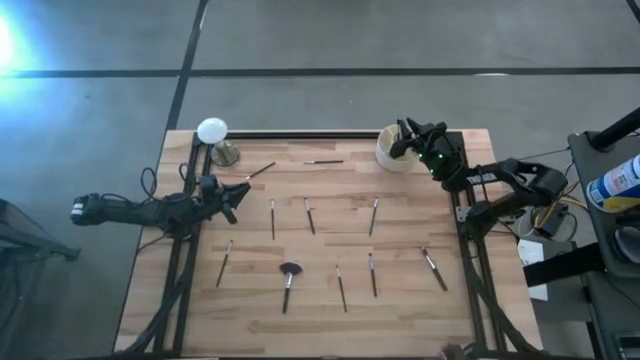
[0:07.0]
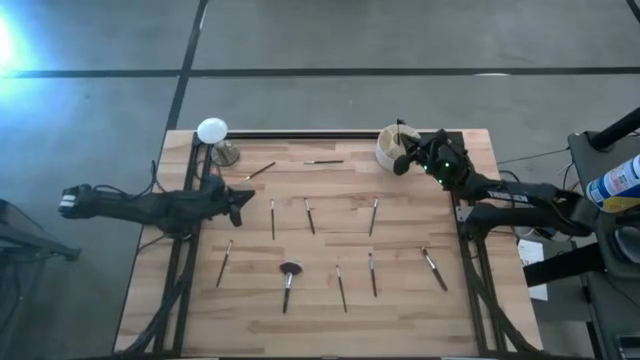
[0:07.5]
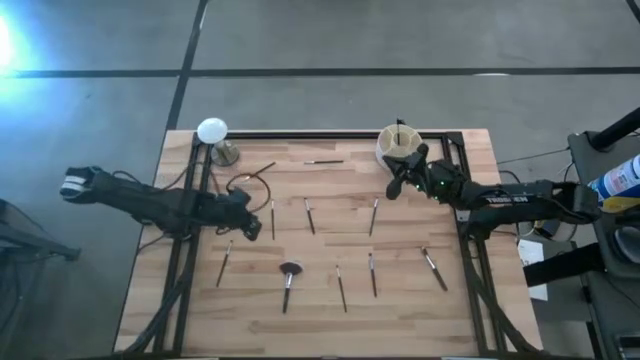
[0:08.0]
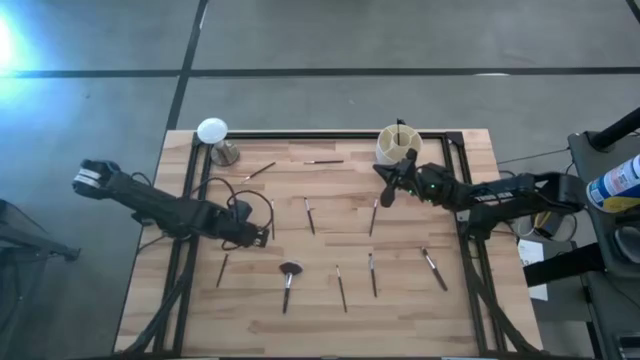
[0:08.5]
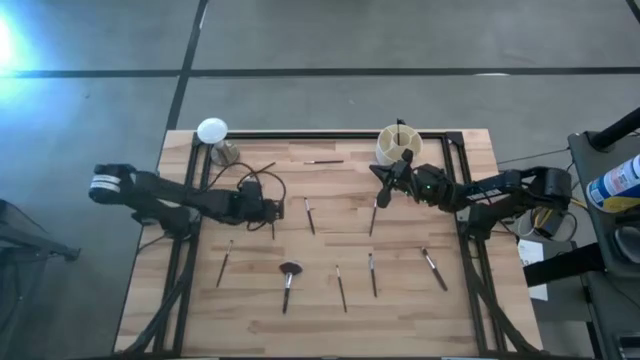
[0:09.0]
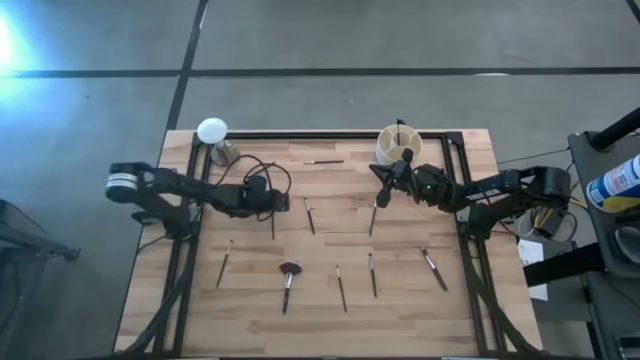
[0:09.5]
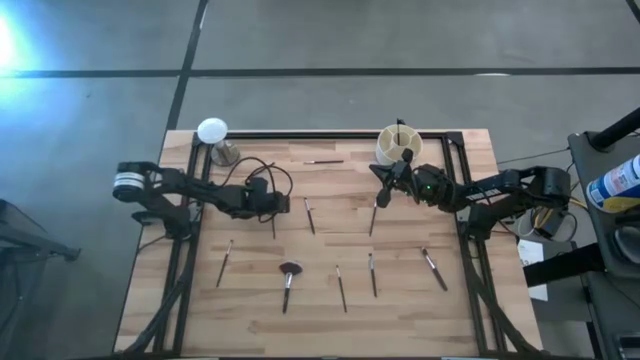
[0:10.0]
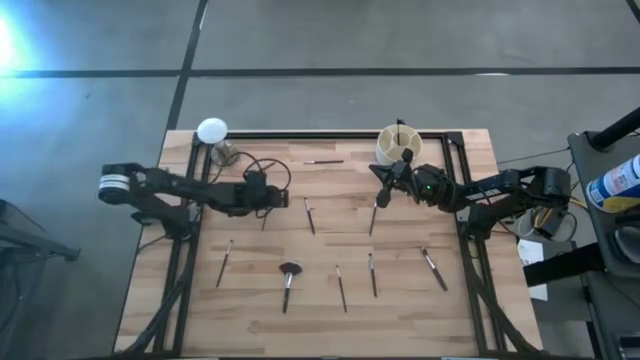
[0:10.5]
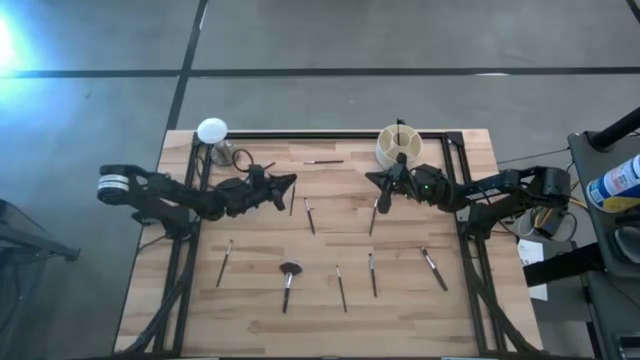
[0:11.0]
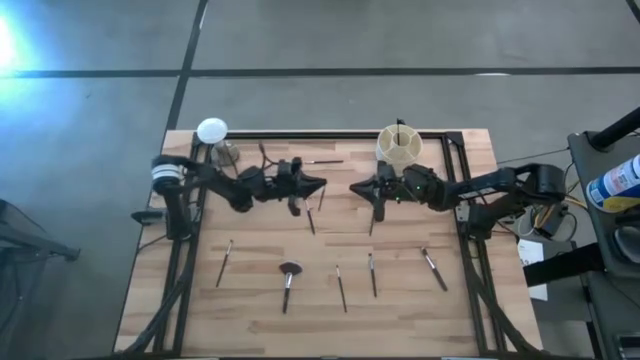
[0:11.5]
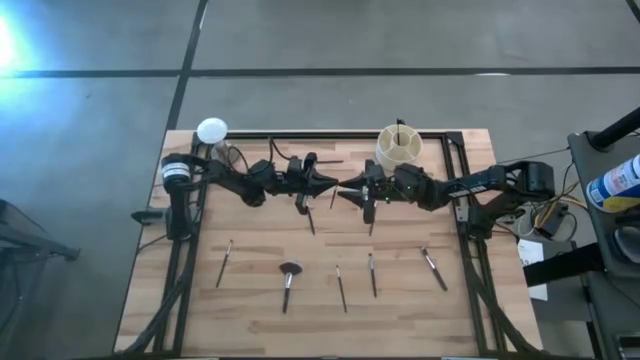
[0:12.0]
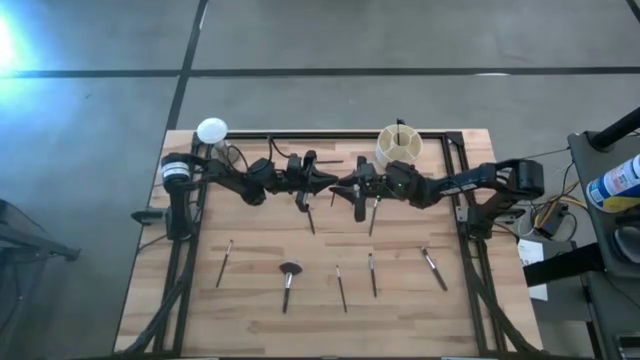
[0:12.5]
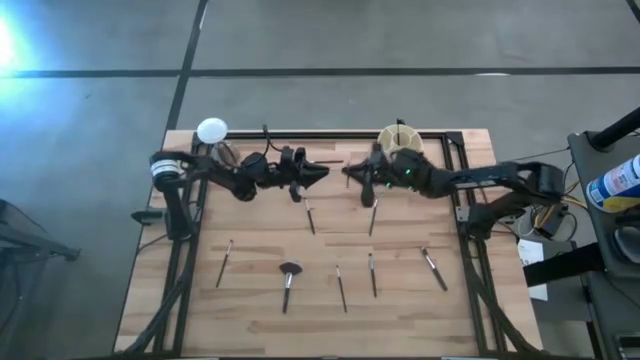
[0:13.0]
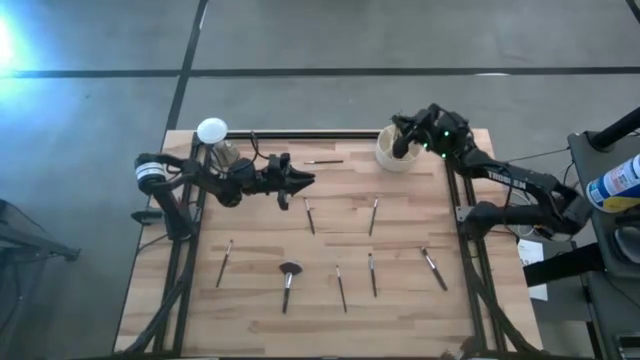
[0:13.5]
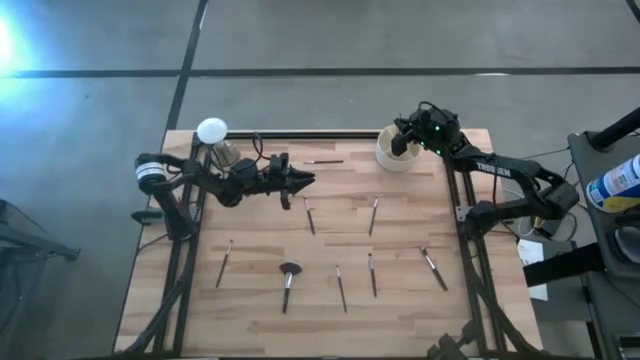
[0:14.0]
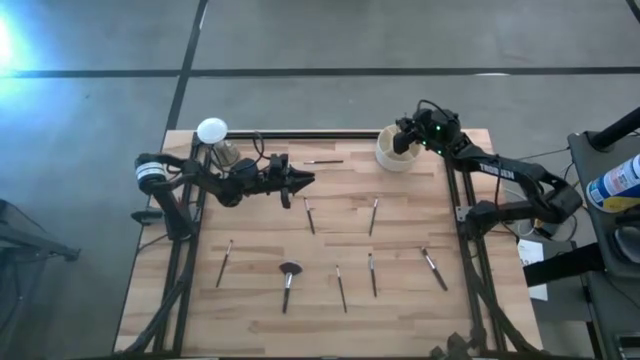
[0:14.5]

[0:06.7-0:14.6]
Task: Put items in baskets/containers
Put the black eyeshadow brush into the white pen organizer

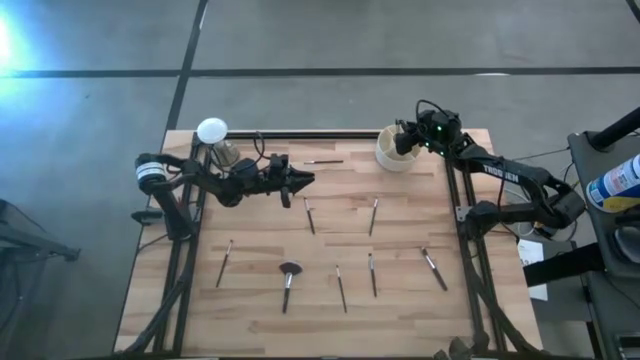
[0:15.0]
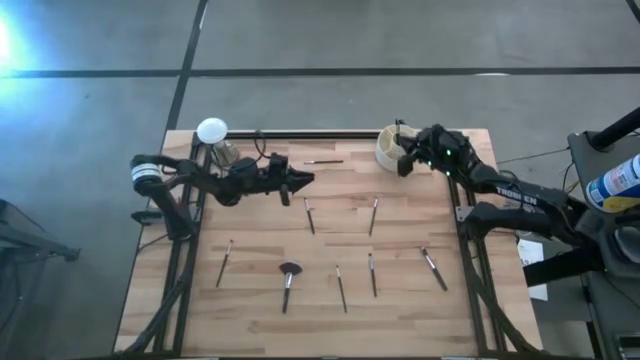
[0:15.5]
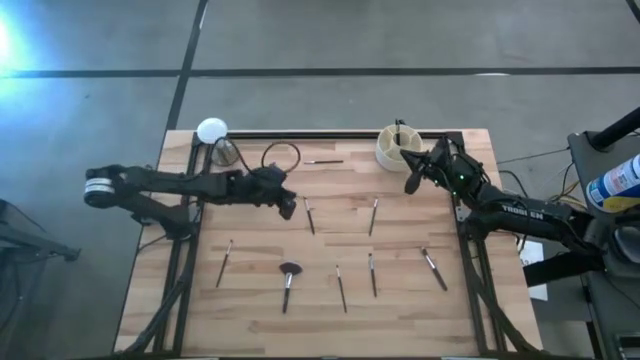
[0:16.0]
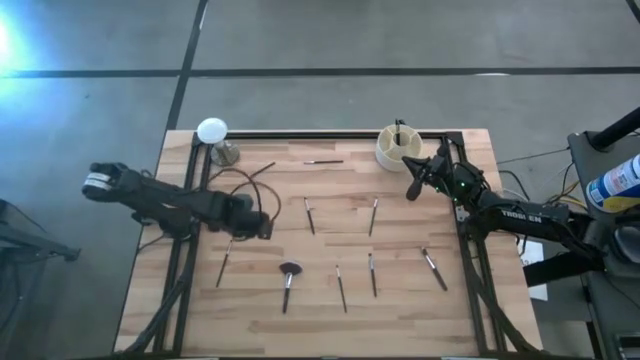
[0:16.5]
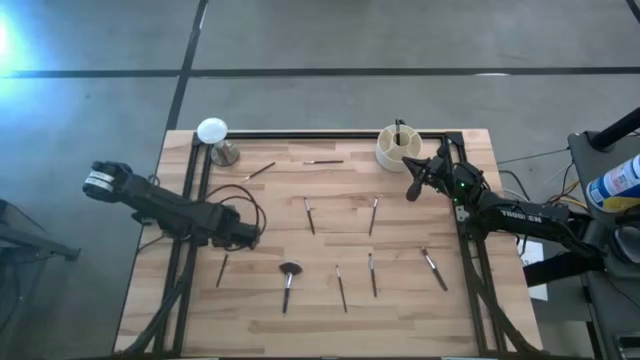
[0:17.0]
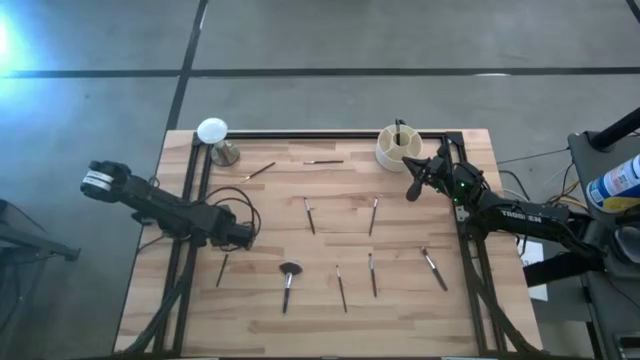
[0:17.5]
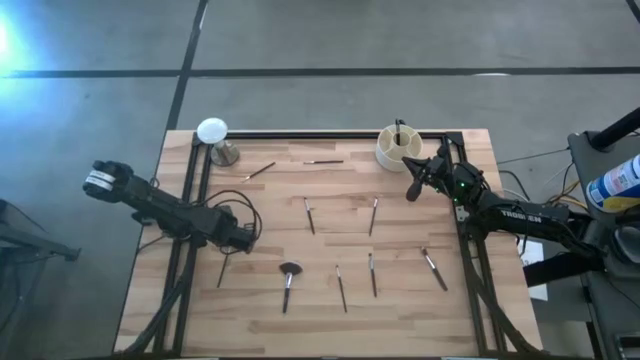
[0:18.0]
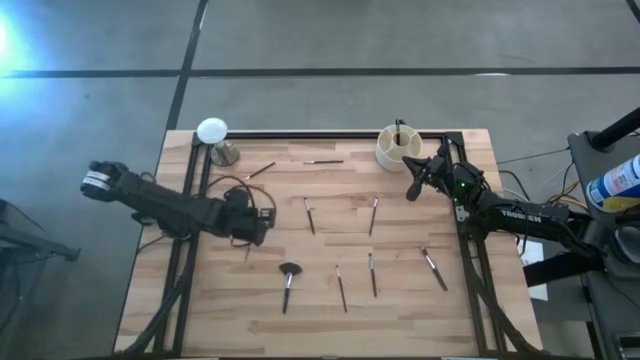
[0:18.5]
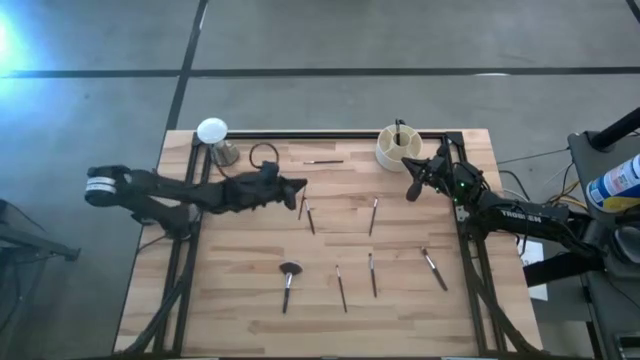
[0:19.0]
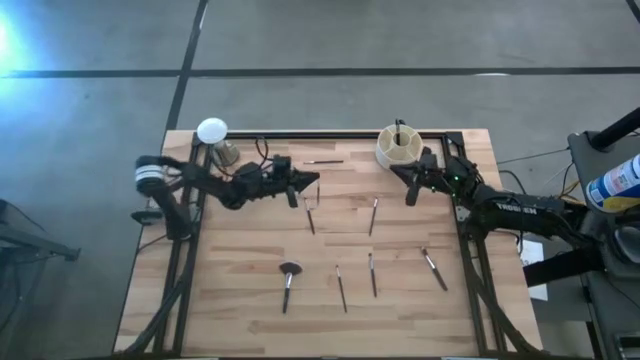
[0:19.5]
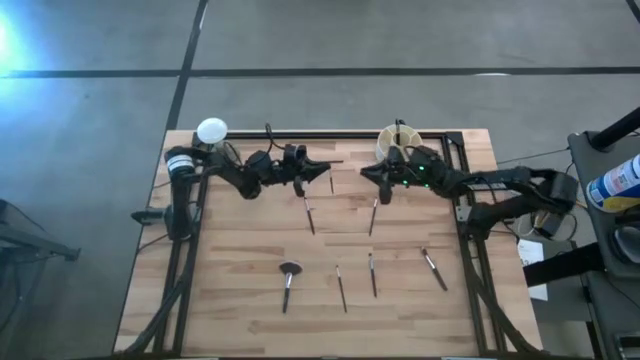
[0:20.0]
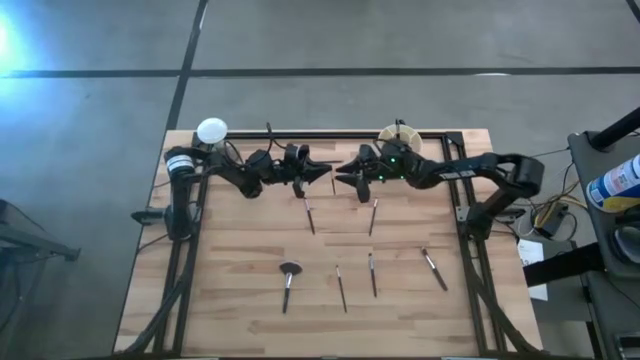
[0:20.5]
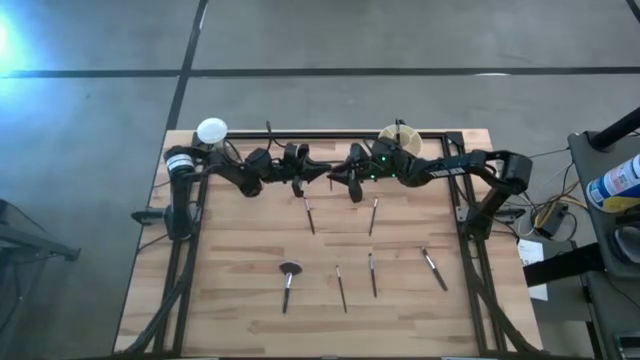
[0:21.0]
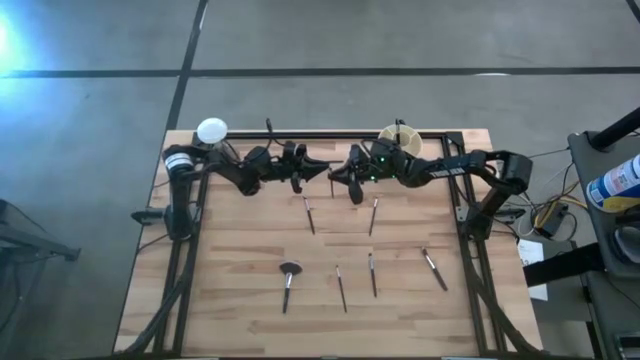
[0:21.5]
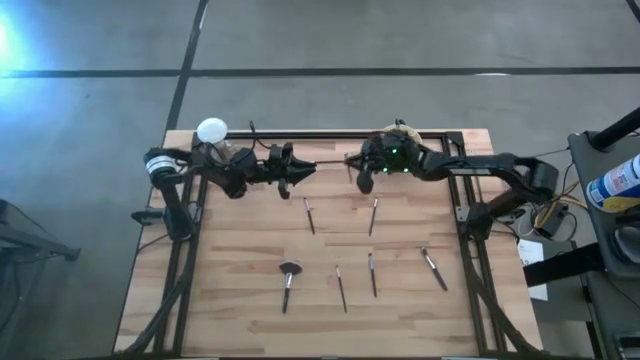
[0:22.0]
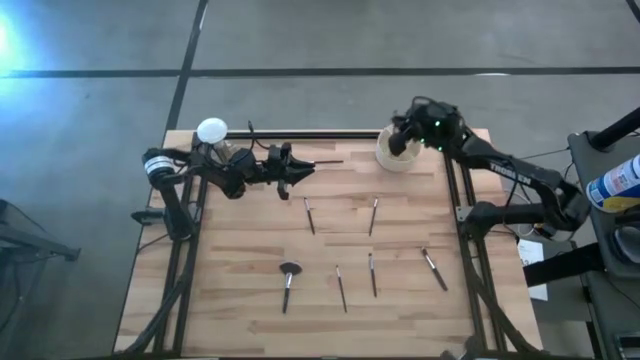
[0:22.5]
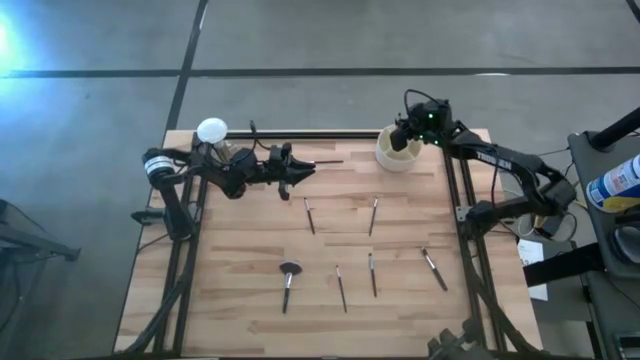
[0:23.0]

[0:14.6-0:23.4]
Put the black eyeshadow brush into the white pen organizer

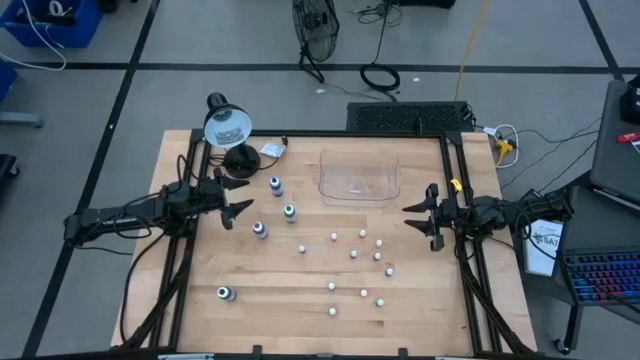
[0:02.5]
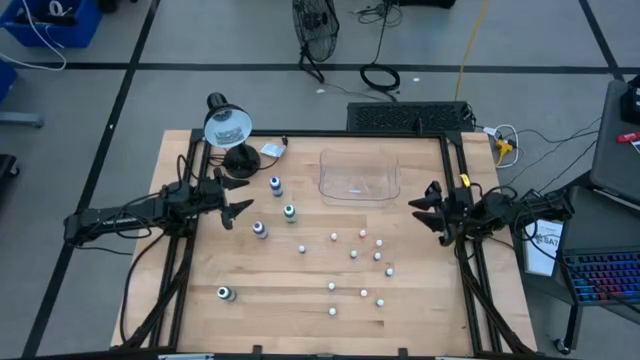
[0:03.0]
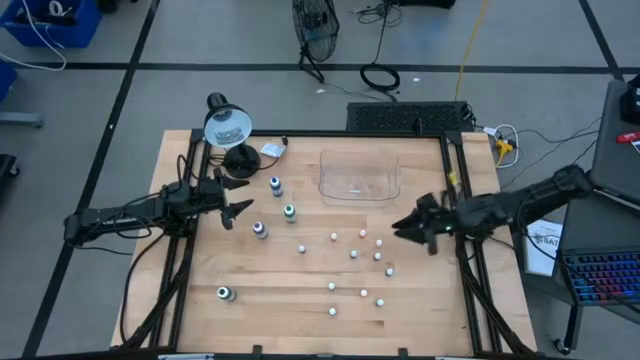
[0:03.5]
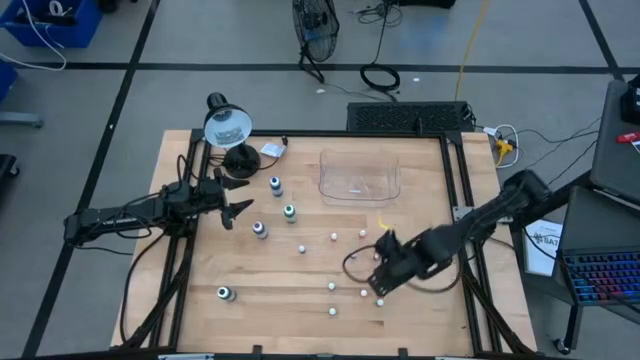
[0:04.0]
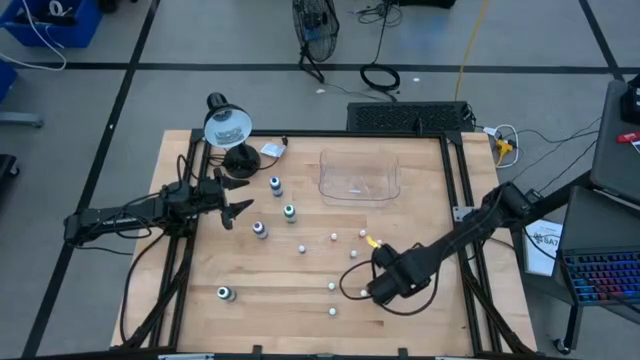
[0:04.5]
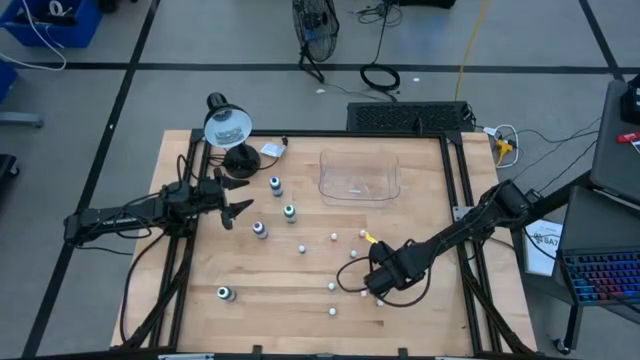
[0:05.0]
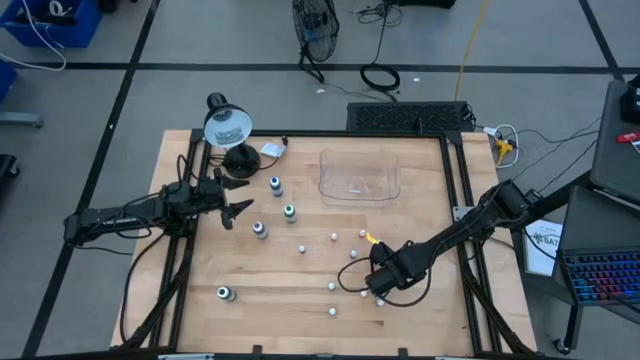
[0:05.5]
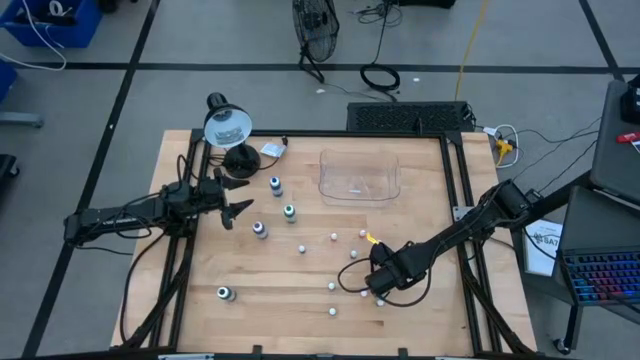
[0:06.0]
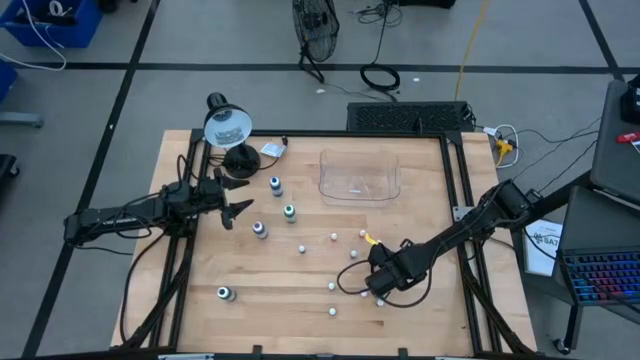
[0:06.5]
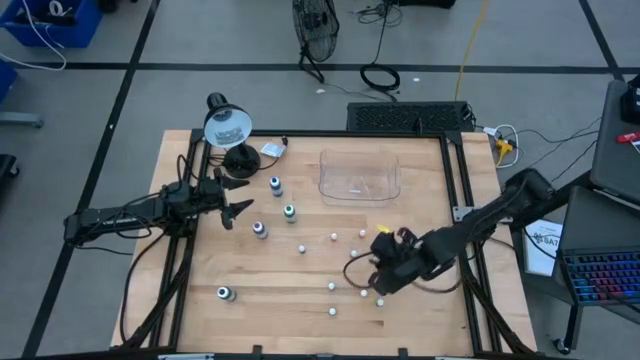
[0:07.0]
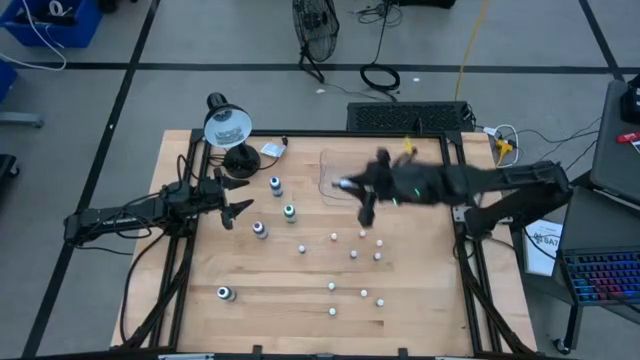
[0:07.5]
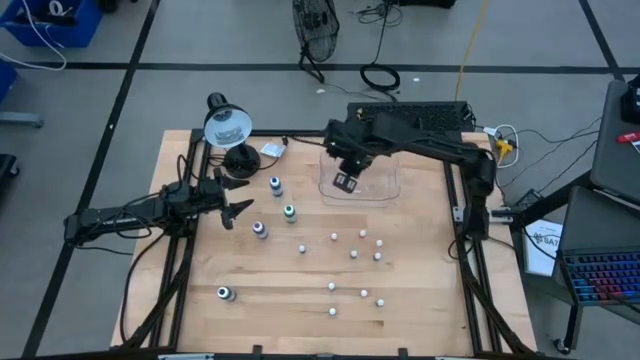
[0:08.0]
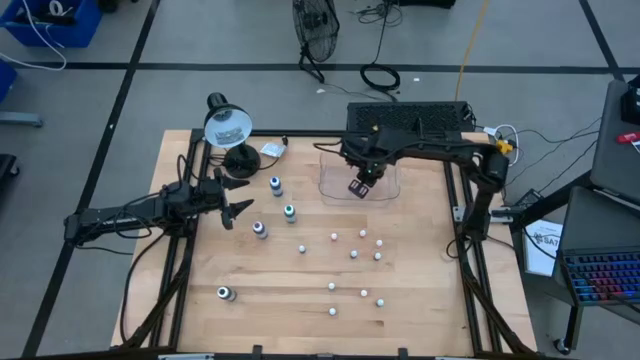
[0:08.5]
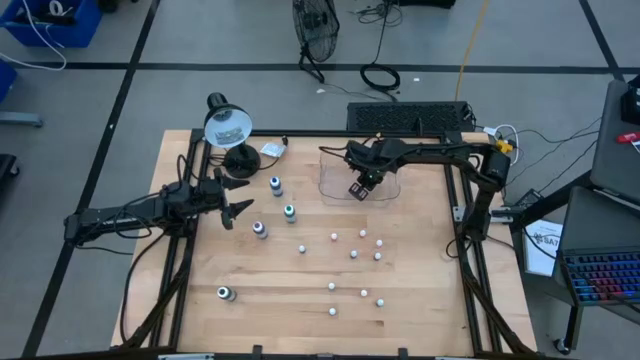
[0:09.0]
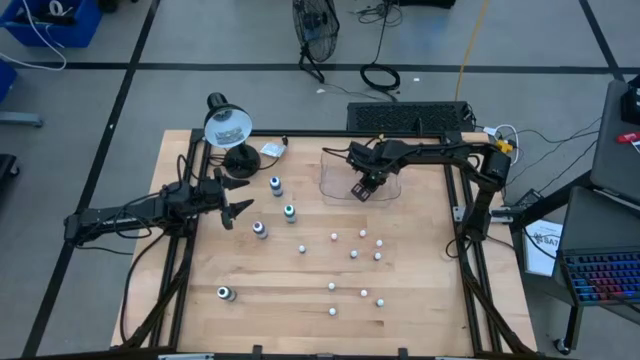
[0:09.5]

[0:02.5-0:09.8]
Task: Pick & Place food coloring
Put the black food coloring into the transparent bin
